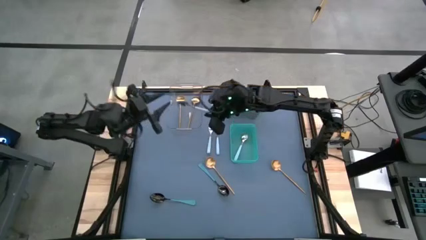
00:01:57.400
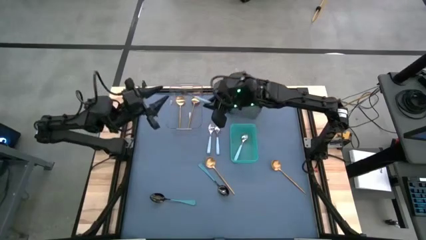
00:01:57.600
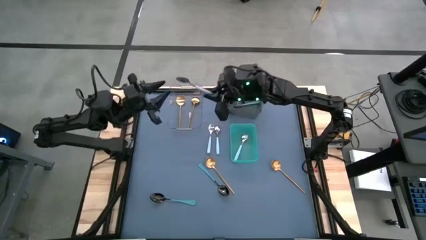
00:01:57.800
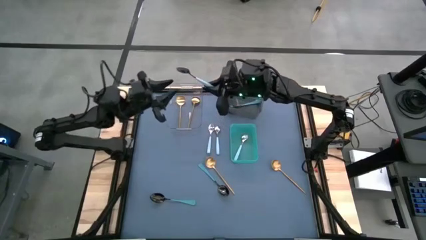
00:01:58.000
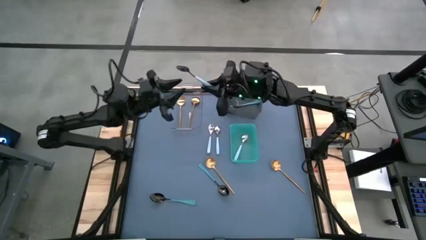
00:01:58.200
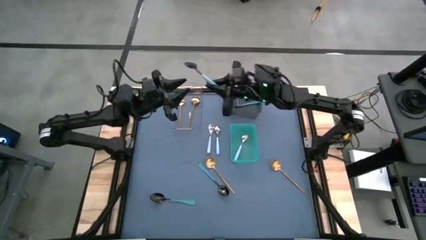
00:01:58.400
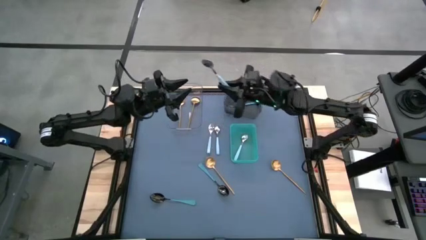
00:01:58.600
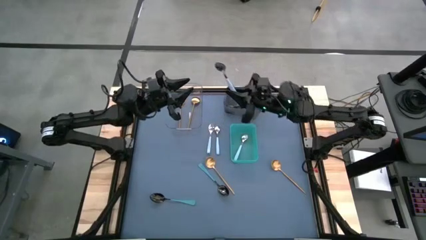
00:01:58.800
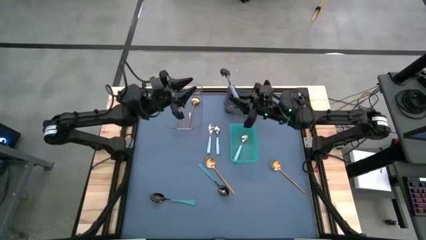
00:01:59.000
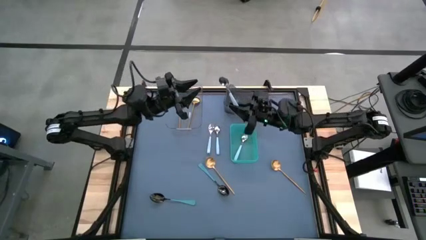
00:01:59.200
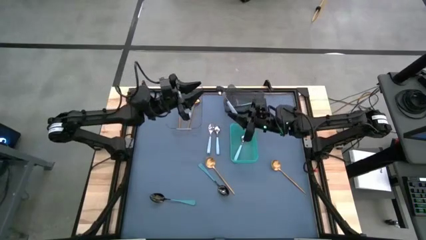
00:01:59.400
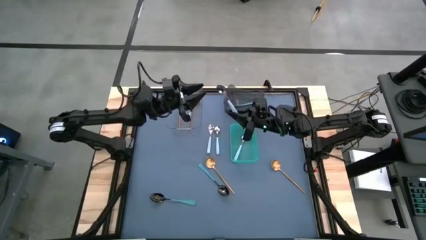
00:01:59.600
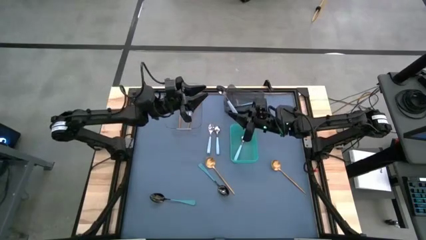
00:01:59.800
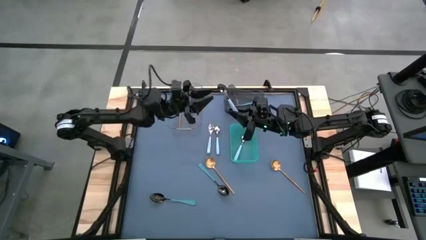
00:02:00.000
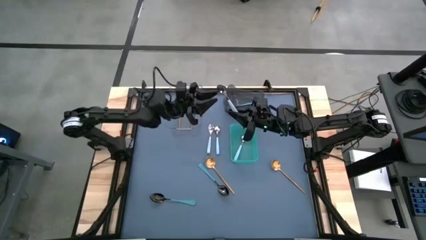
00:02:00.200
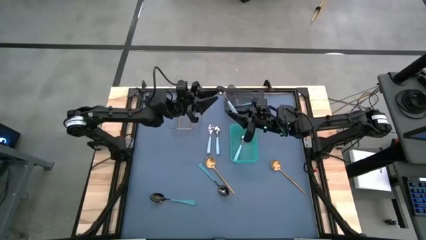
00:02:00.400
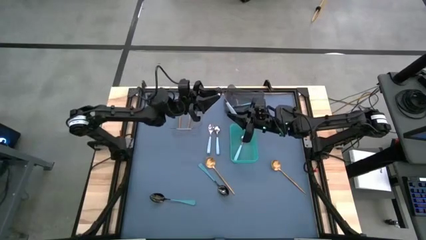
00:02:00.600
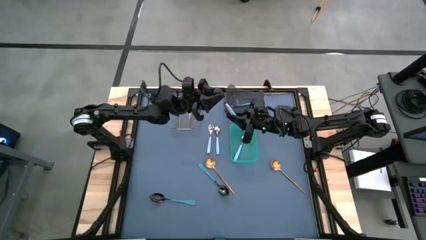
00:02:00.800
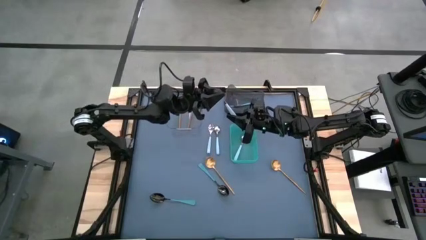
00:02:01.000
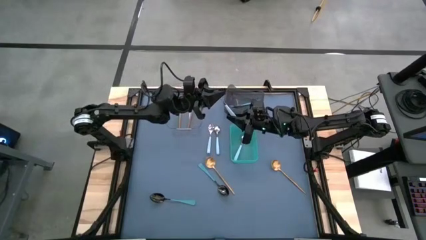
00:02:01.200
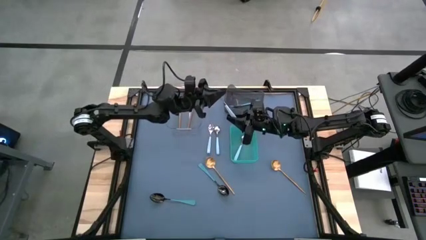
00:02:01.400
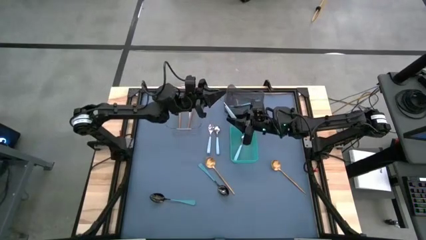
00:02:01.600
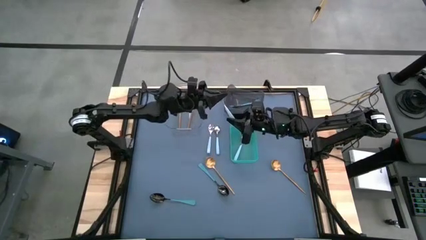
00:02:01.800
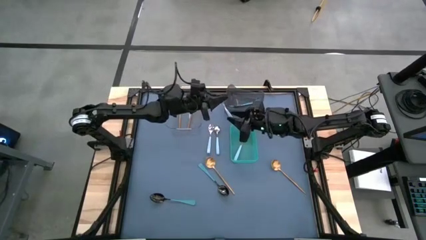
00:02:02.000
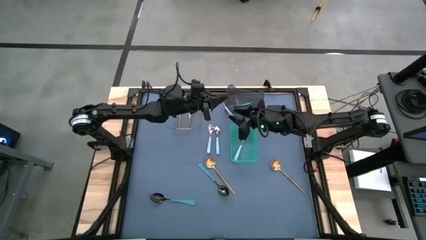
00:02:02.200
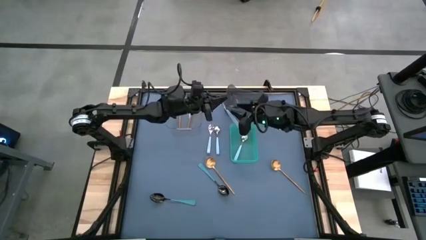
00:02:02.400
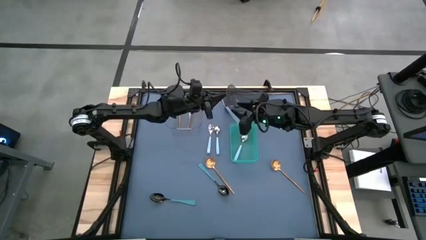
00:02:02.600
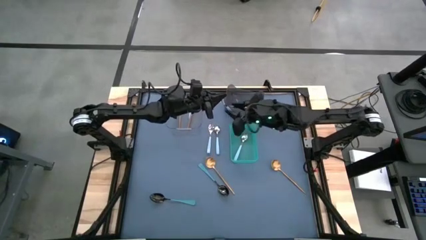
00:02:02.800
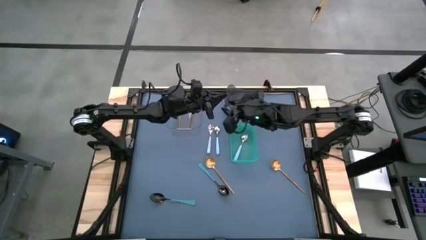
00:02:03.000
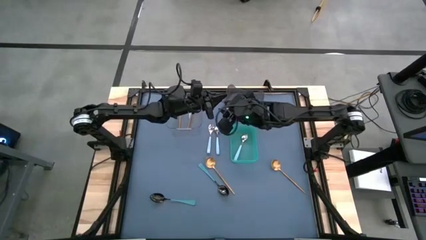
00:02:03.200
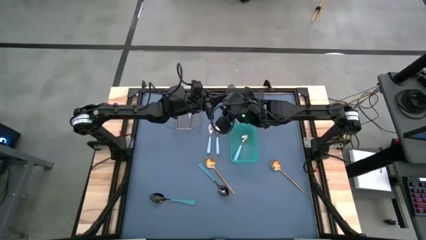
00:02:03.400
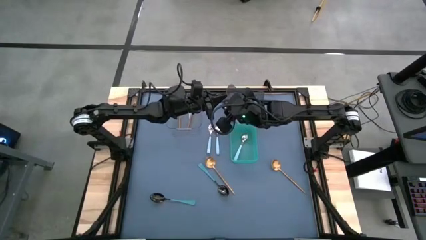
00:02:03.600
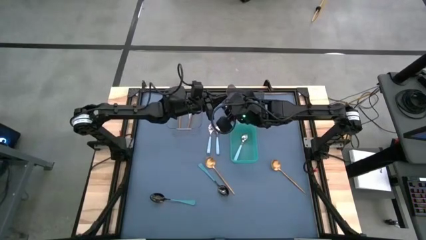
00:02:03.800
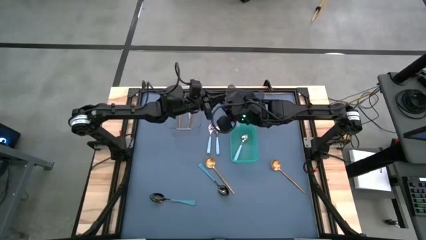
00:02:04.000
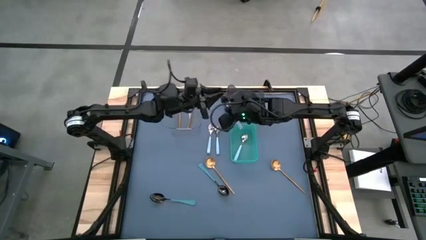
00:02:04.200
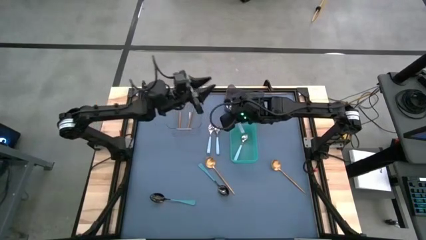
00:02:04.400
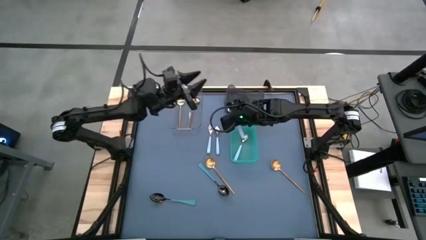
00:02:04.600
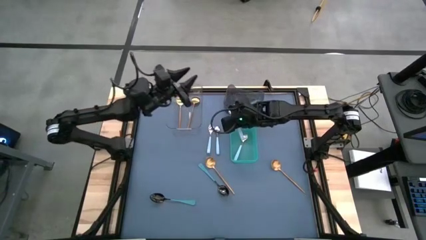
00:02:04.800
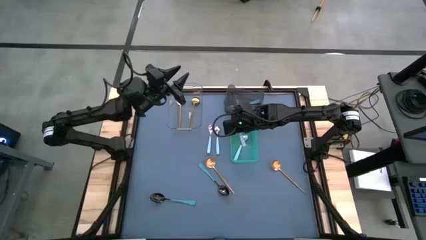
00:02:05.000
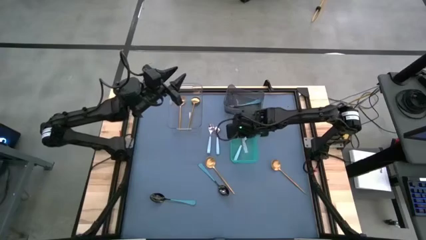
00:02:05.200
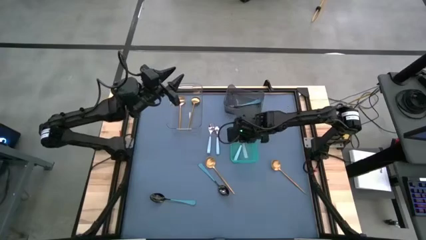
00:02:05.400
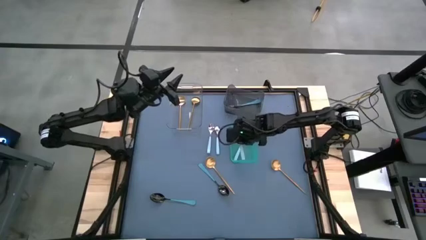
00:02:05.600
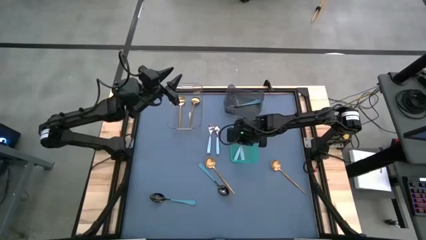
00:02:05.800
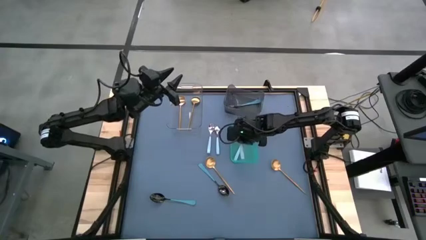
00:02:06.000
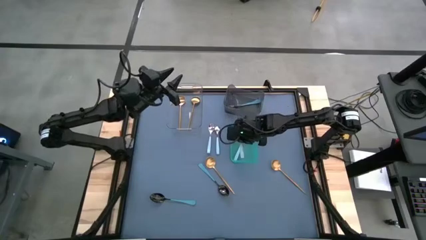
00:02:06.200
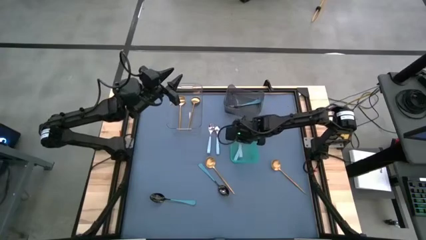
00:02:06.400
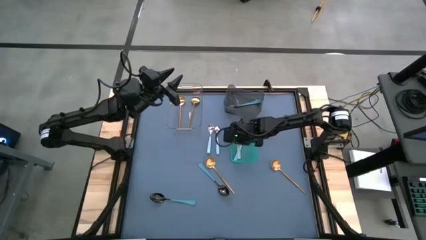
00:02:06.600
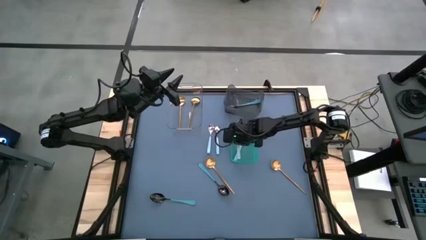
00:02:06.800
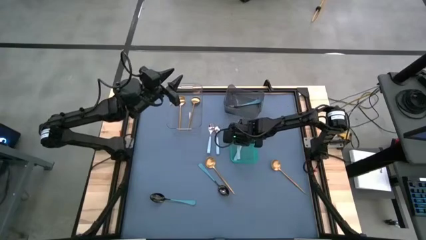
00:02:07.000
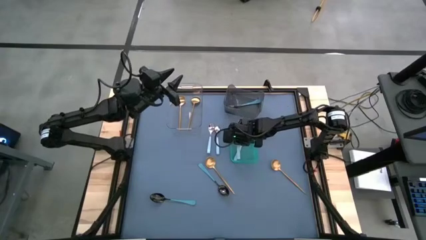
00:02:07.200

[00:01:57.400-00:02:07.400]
Task: Sort silverware by color (type)
Put the light blue spoon into the green bin
